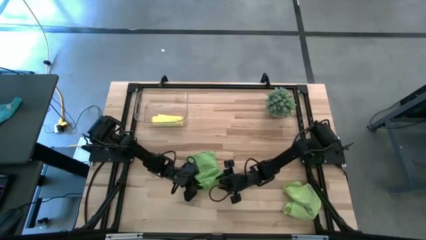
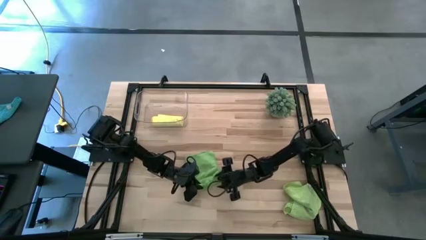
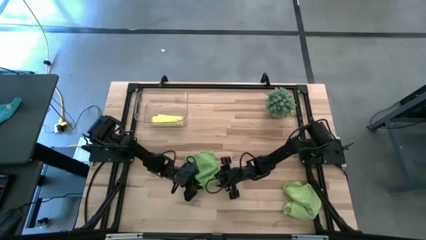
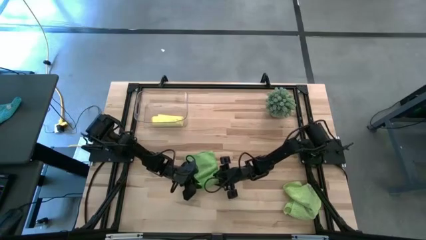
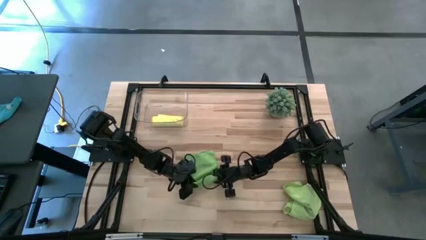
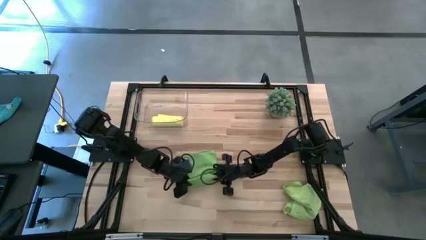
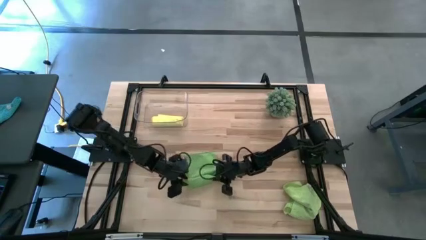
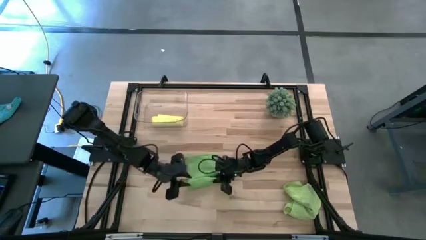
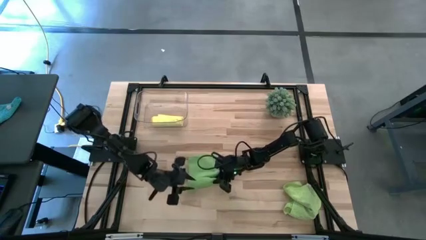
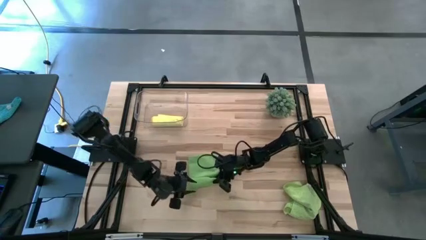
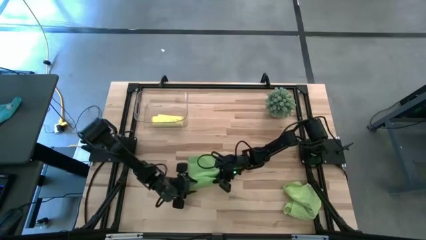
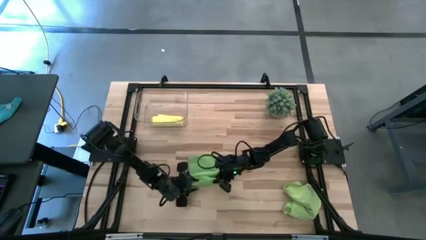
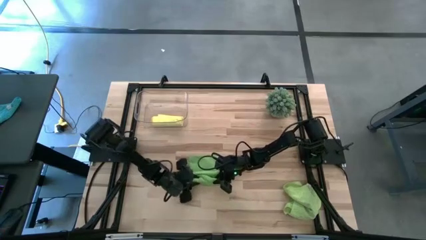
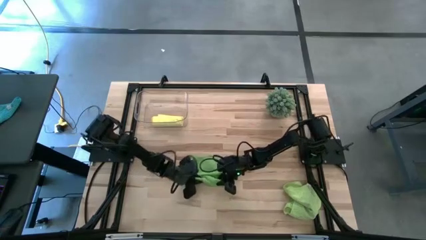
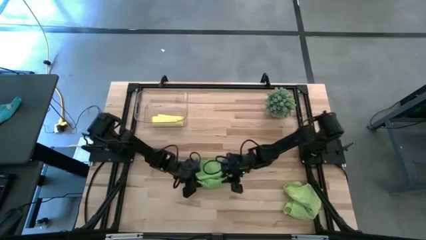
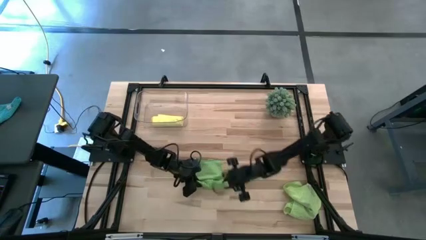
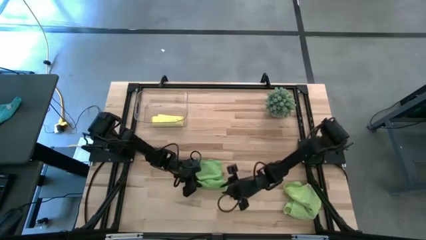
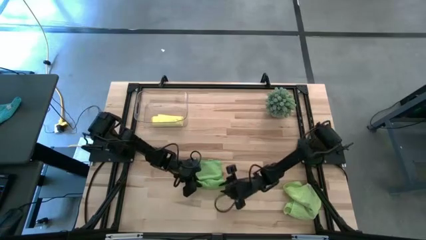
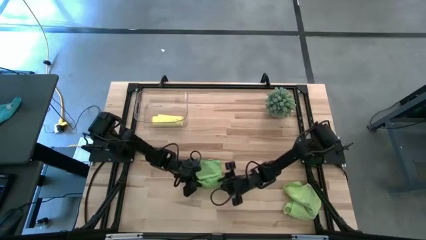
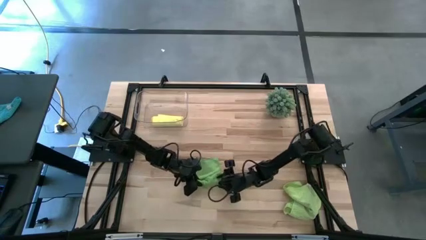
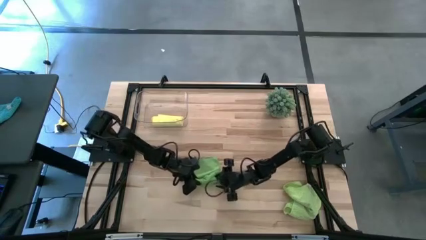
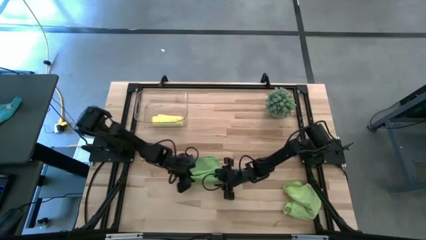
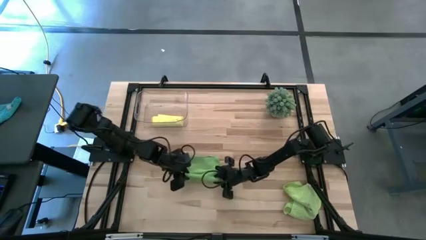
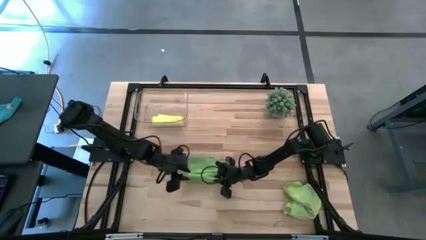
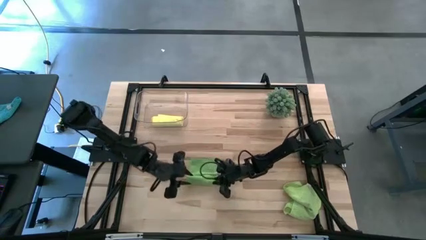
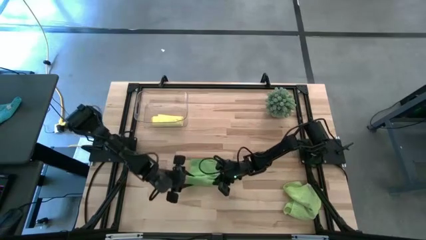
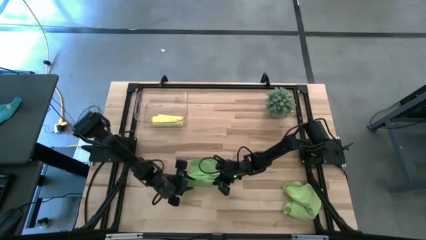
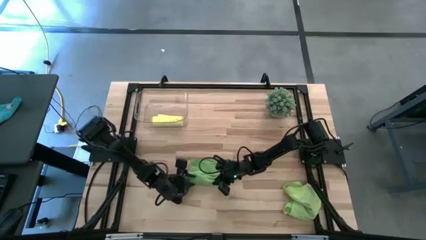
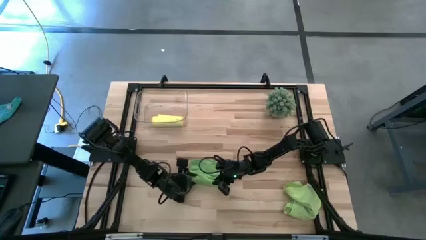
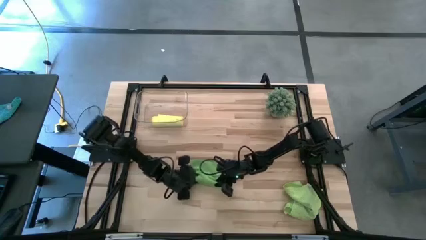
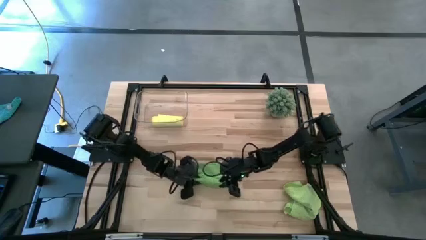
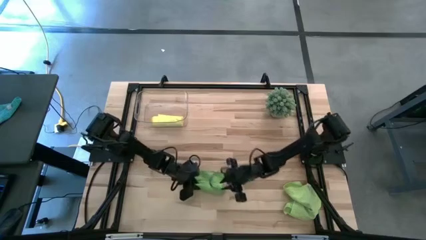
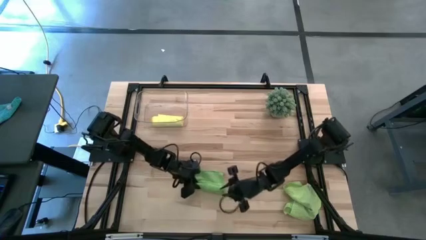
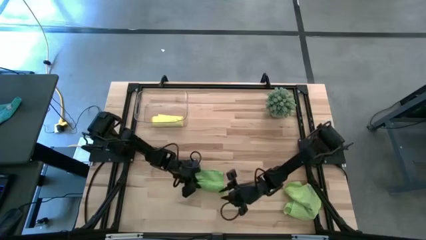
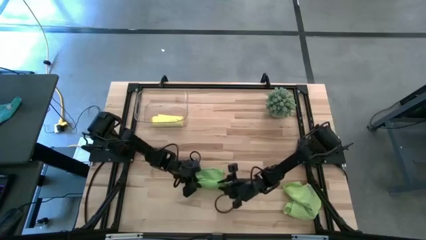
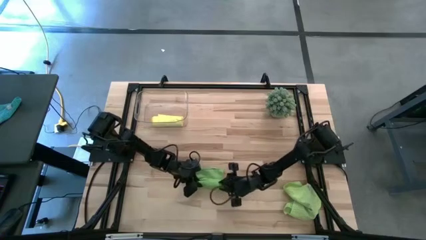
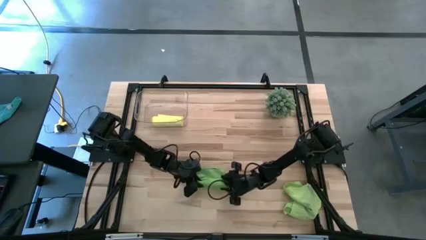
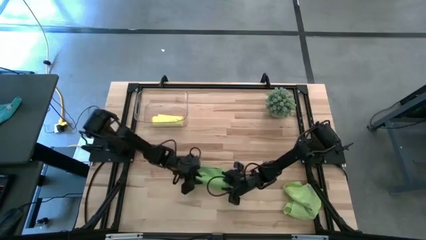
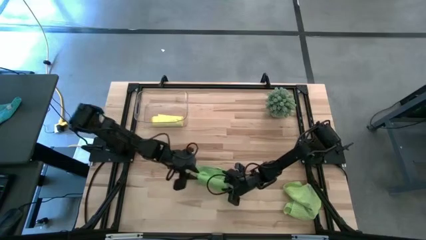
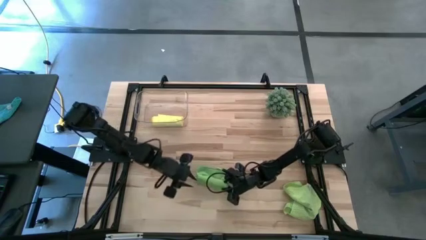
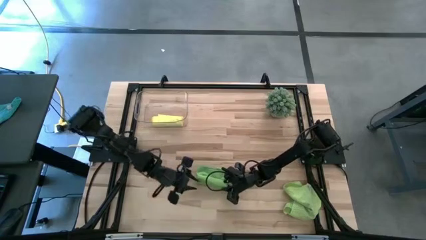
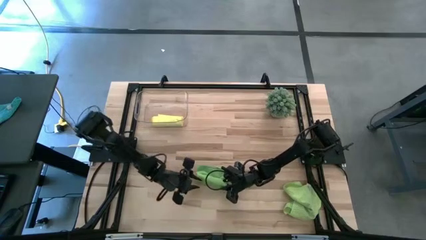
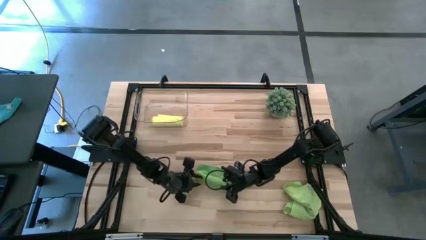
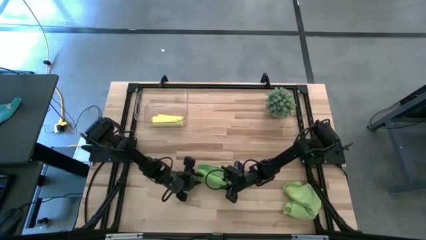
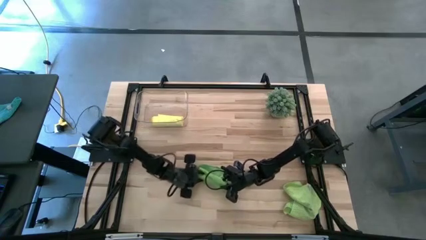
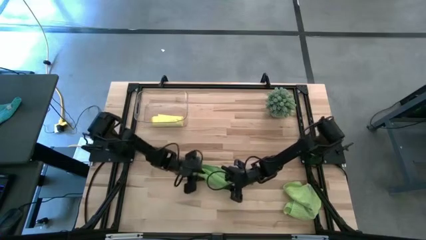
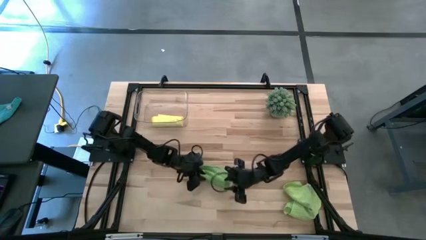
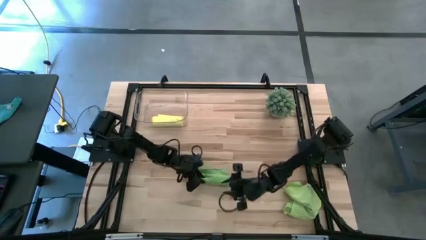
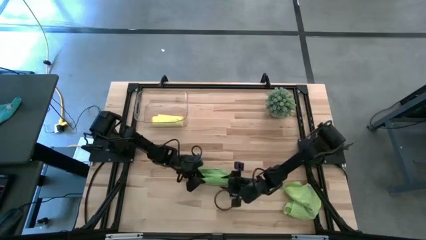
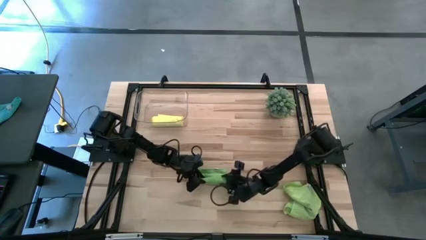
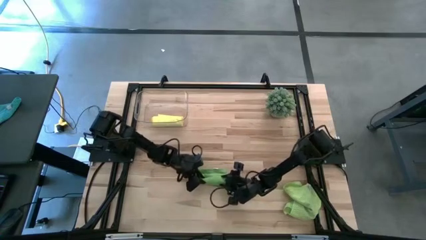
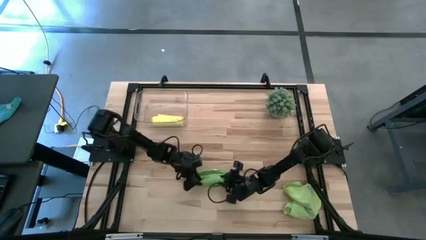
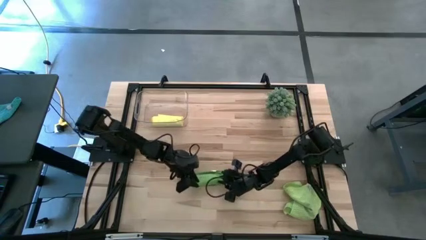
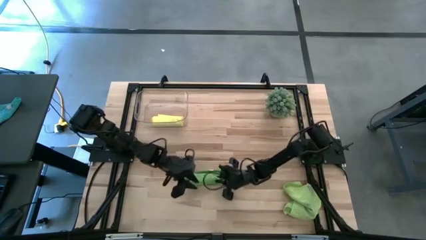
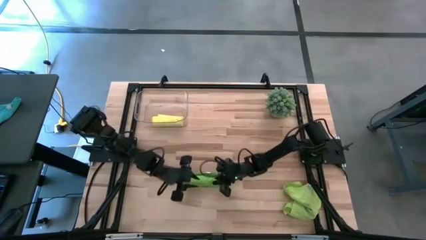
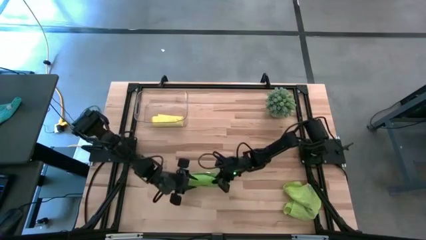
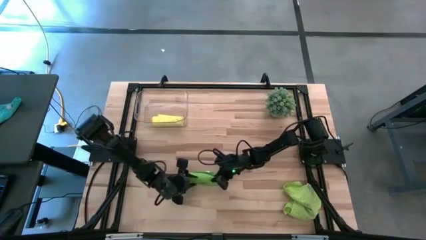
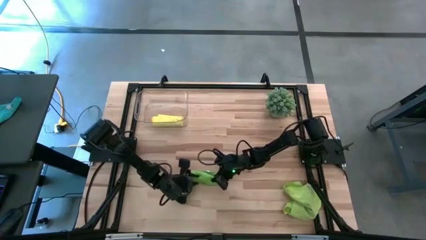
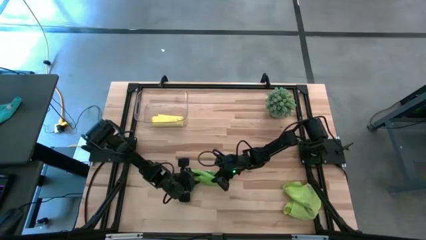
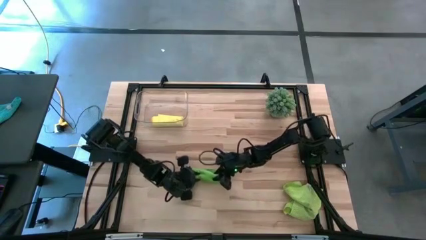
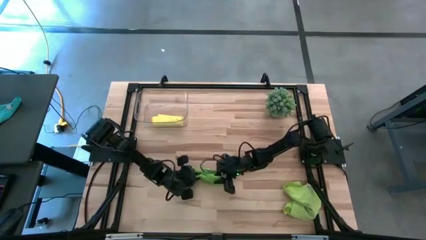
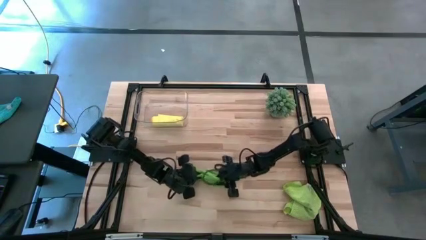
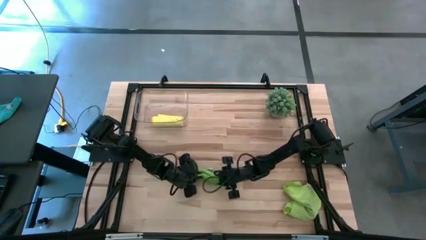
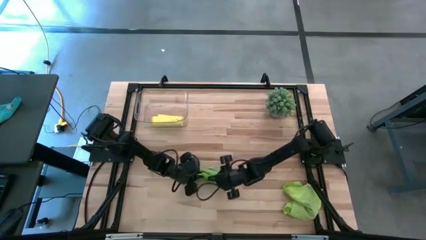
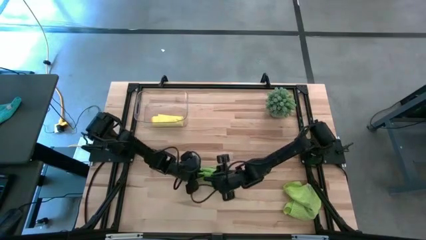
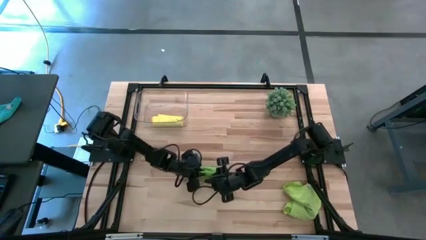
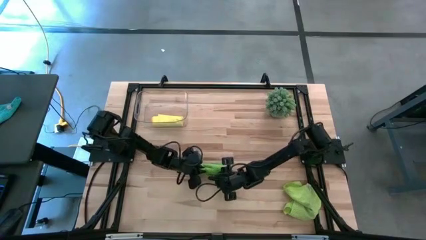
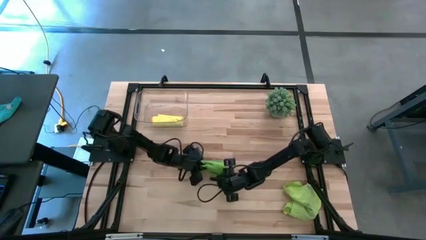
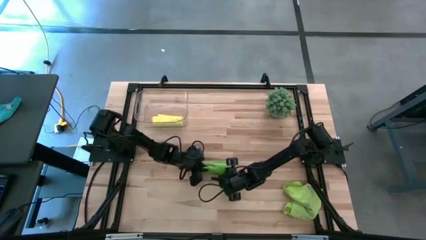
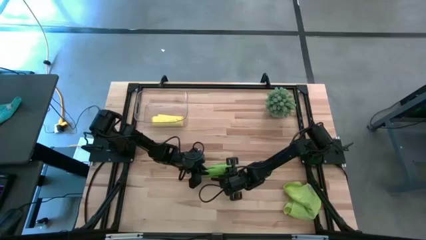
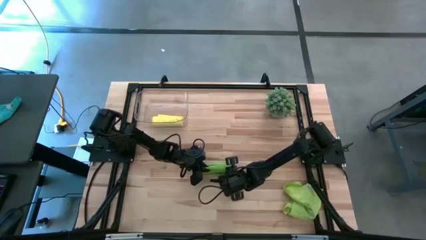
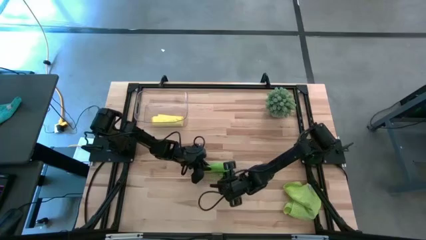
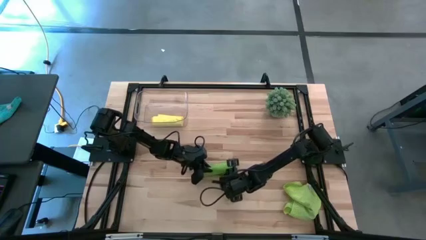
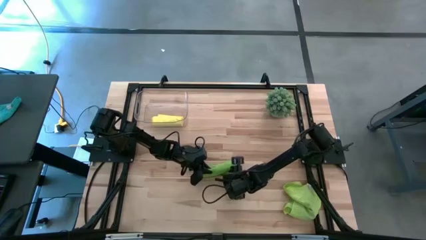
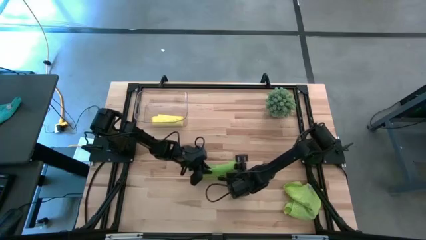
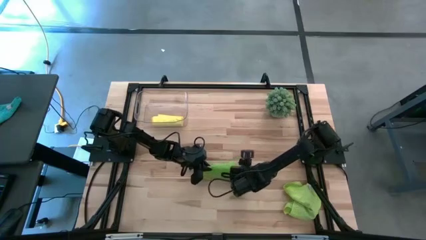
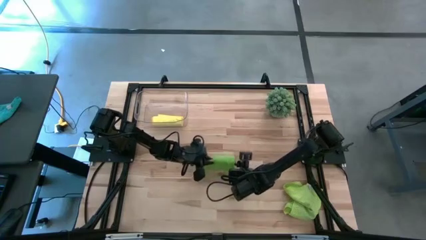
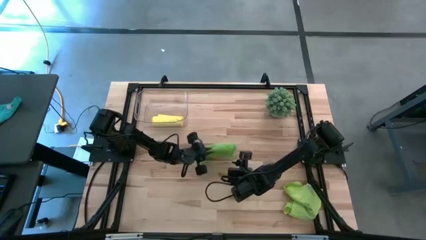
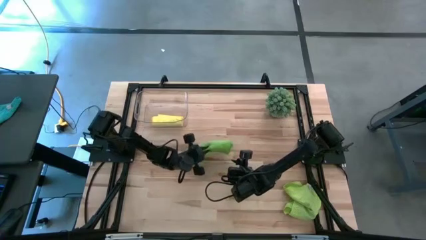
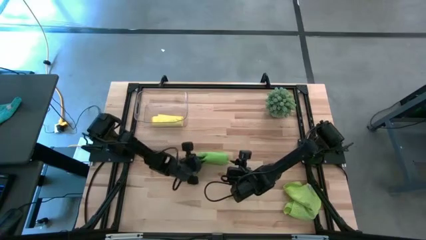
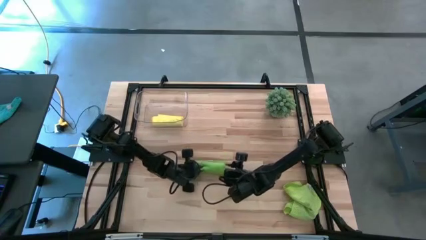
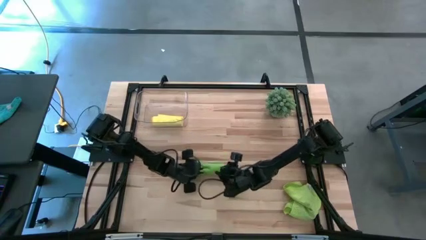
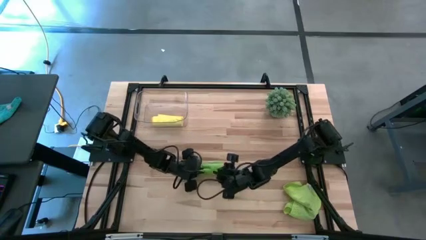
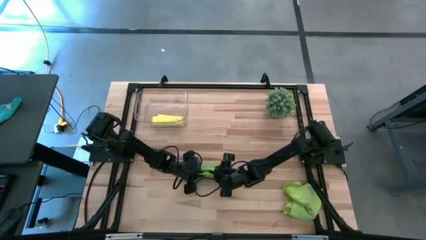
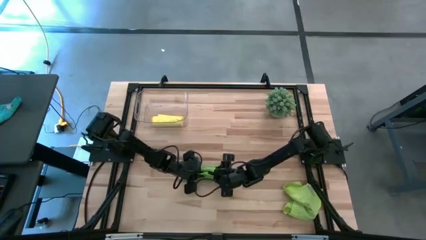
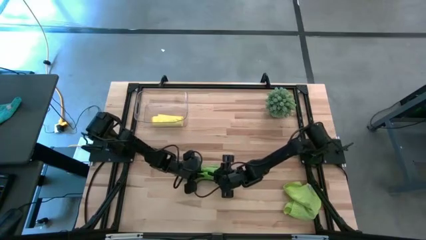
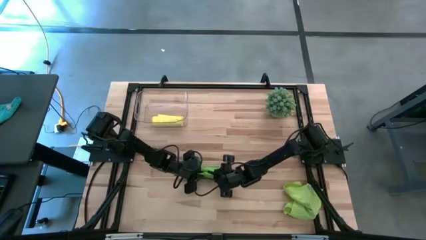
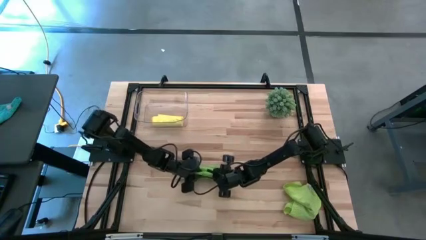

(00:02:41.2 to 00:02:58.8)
Task: Roll microfiber towels into tight, uniform cylinder then place into a basket
Roll the green microfiber cloth
